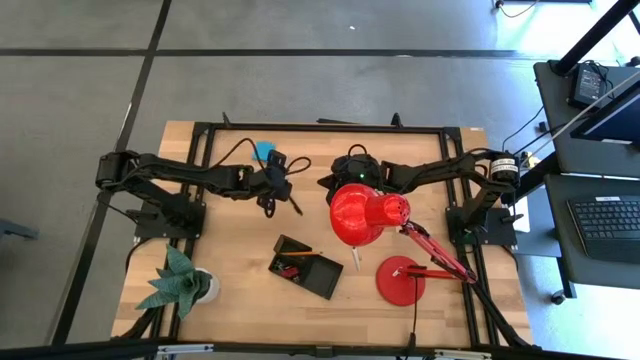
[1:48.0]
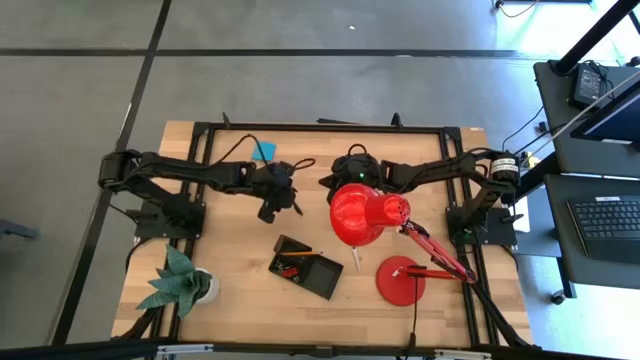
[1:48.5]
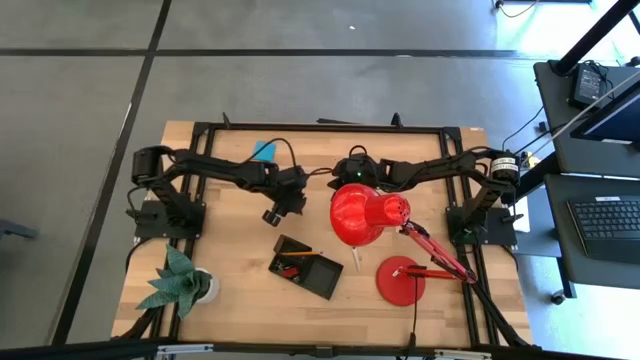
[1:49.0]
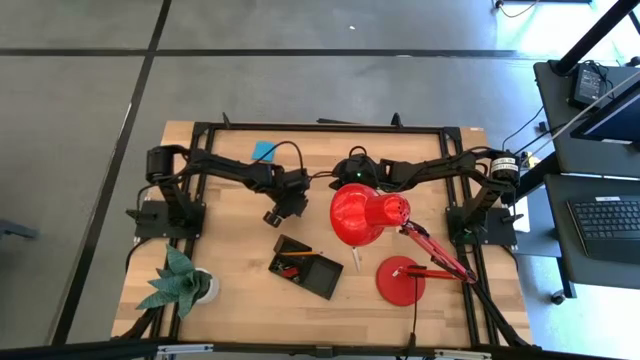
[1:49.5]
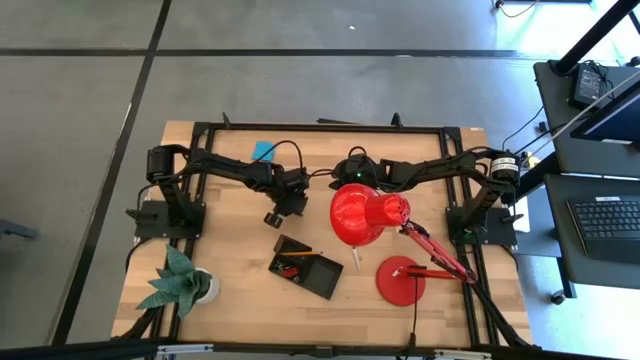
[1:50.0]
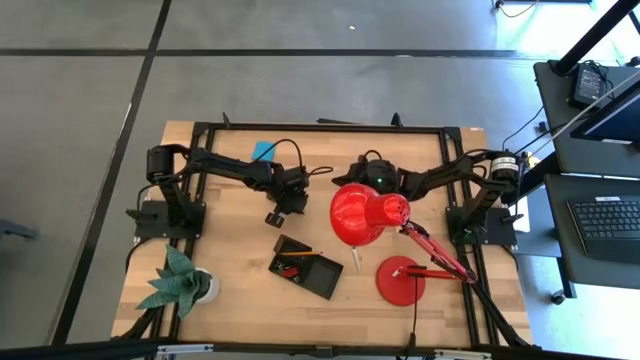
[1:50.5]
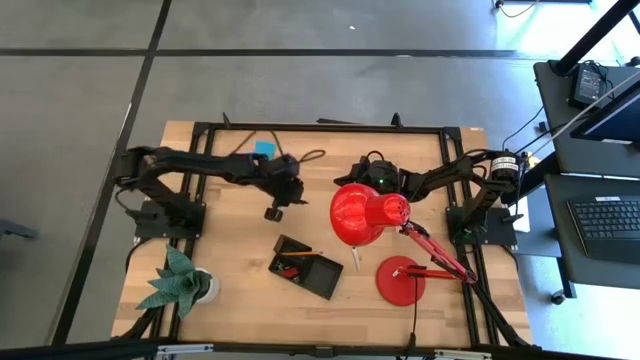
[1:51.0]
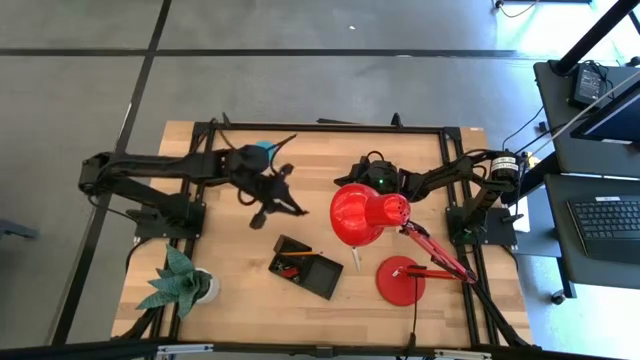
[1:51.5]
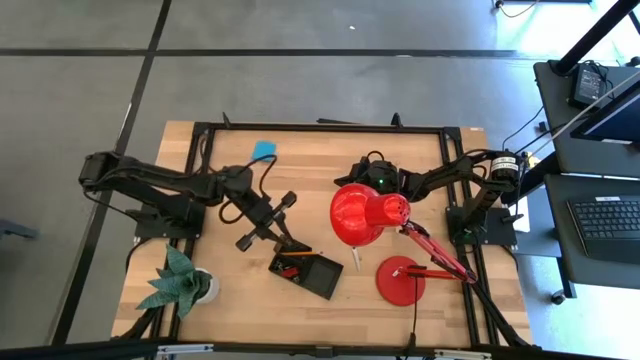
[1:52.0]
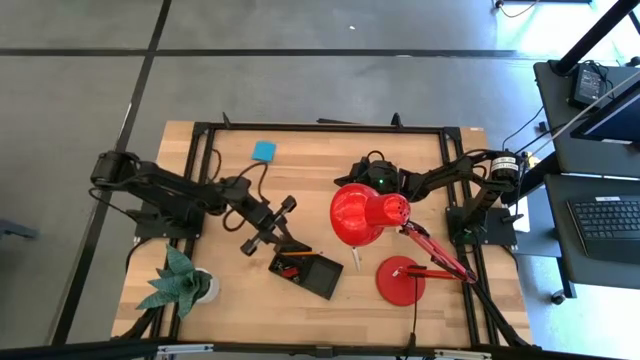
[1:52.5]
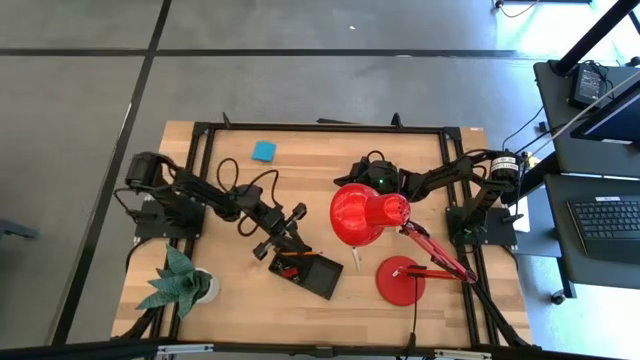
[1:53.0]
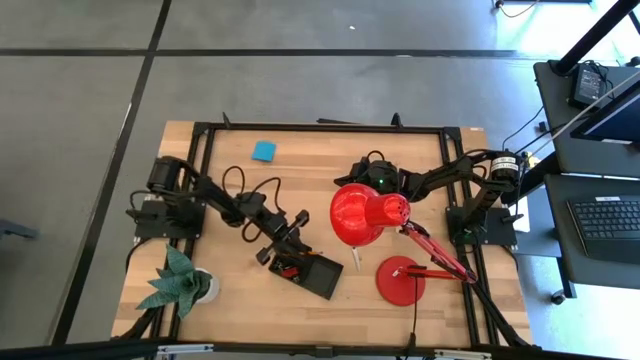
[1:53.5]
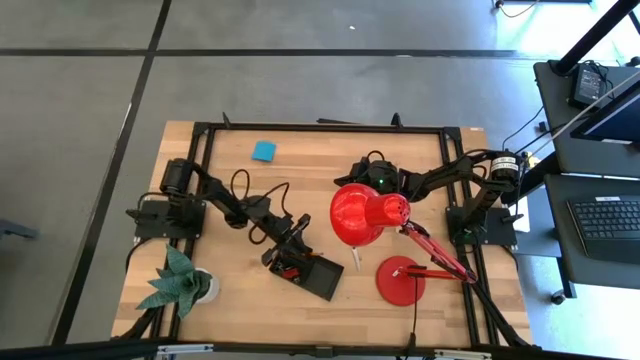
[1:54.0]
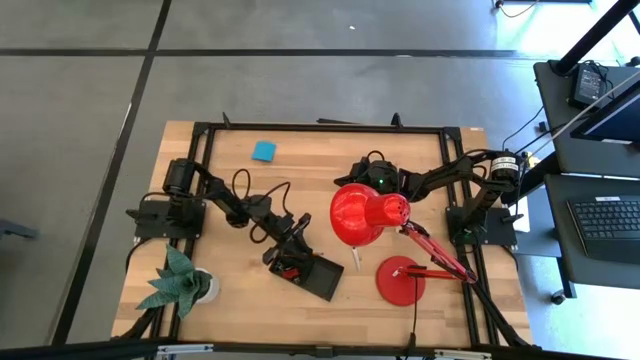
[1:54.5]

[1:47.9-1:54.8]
Task: Pick and place office supplies into organizer
Put the black pen into the desk organizer

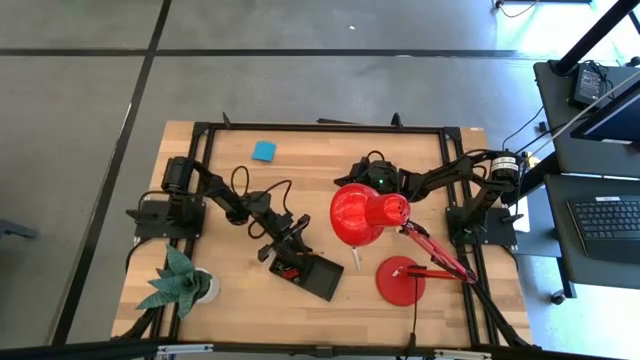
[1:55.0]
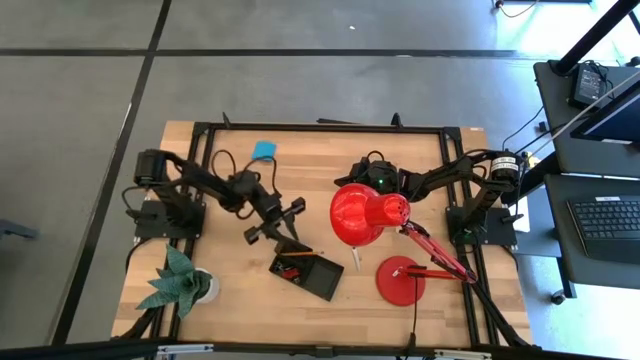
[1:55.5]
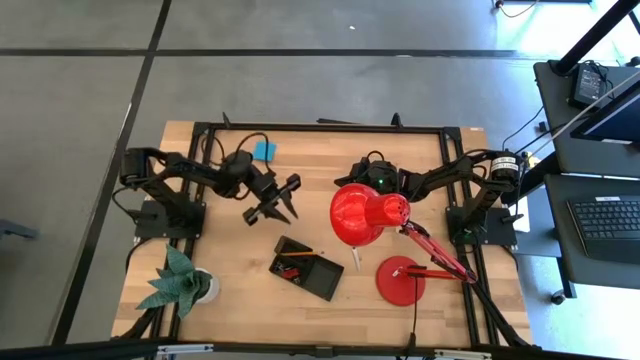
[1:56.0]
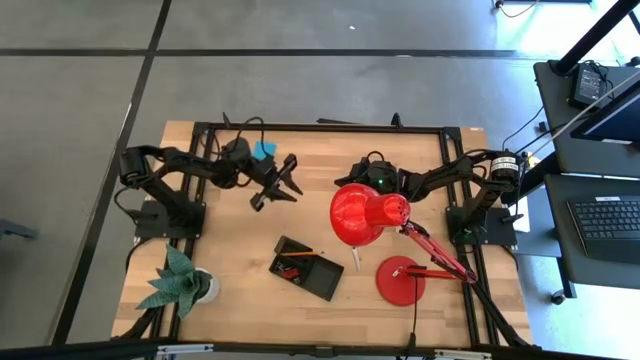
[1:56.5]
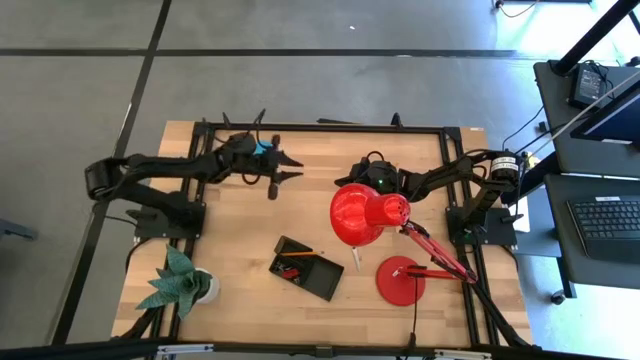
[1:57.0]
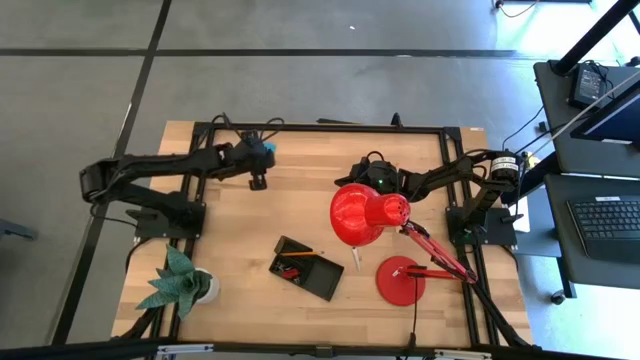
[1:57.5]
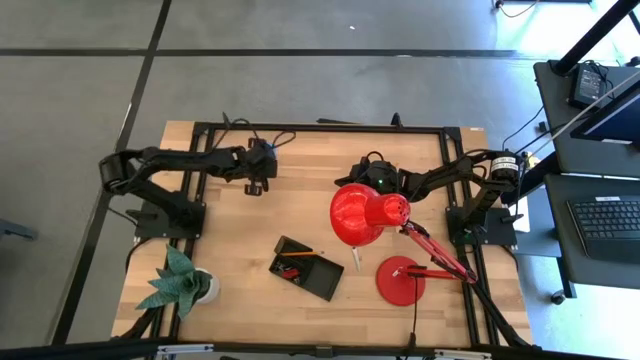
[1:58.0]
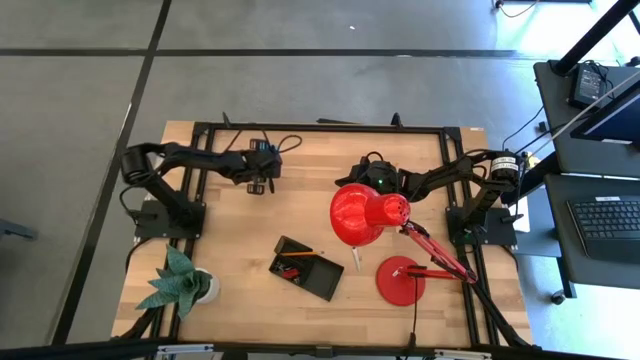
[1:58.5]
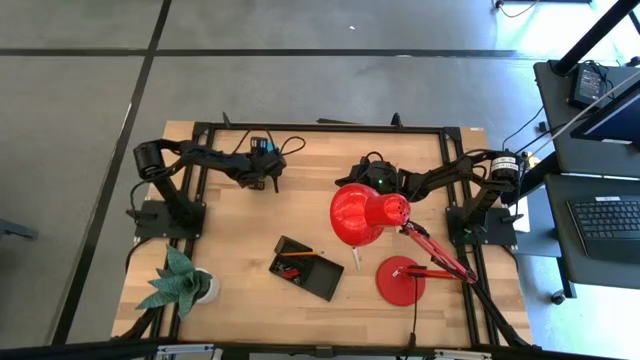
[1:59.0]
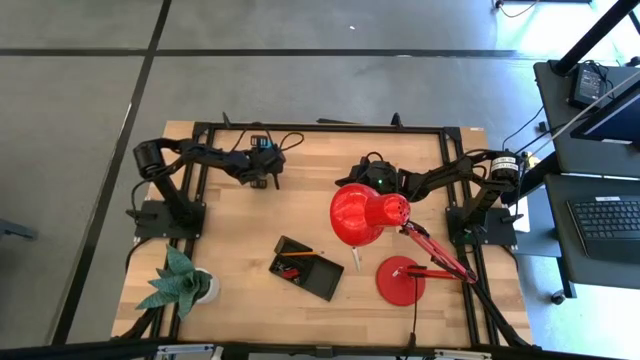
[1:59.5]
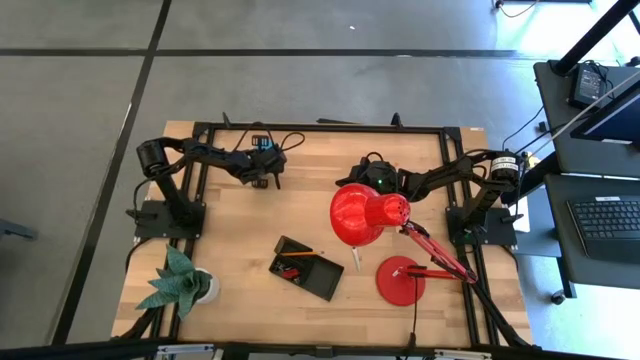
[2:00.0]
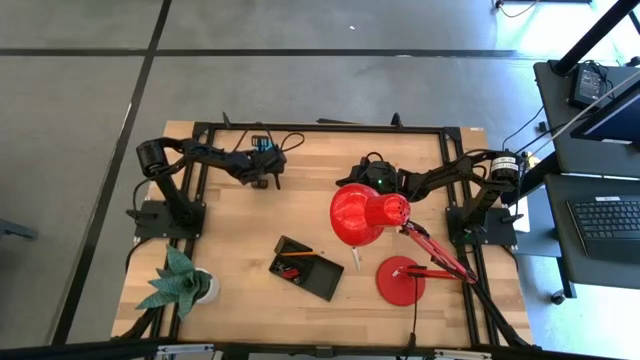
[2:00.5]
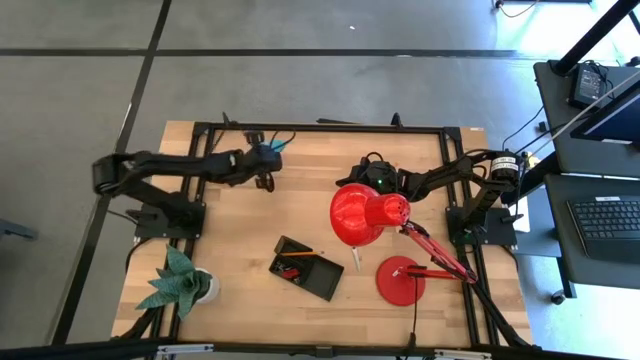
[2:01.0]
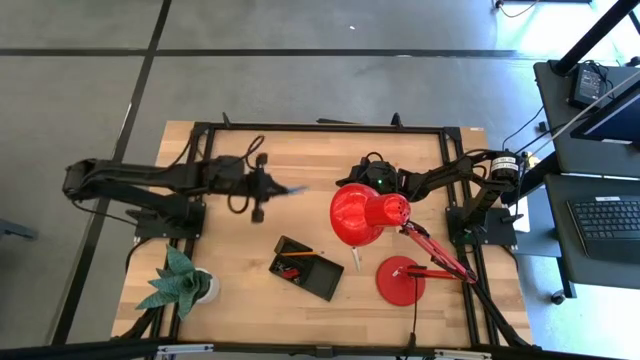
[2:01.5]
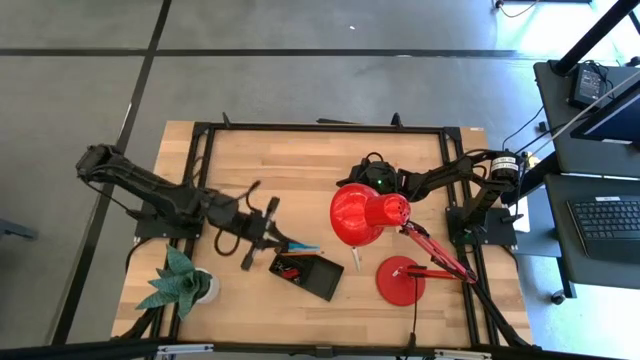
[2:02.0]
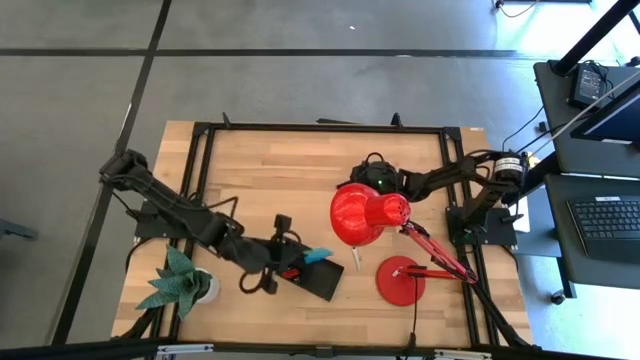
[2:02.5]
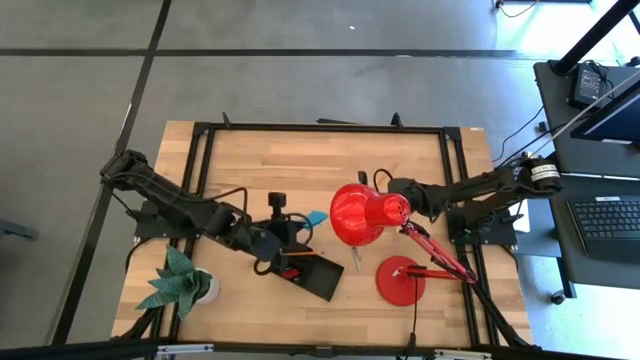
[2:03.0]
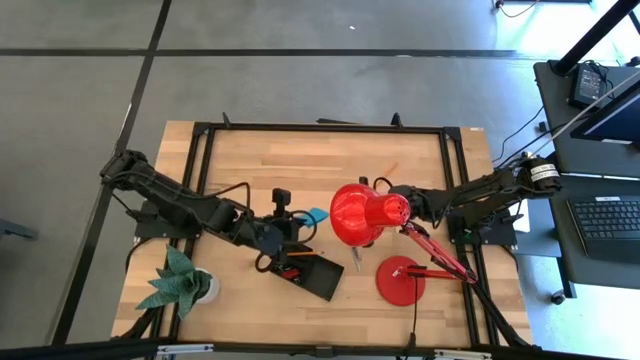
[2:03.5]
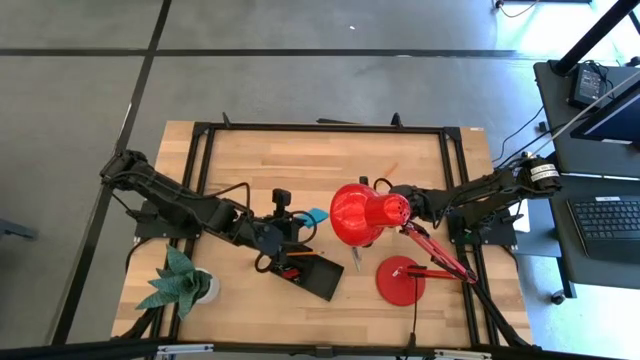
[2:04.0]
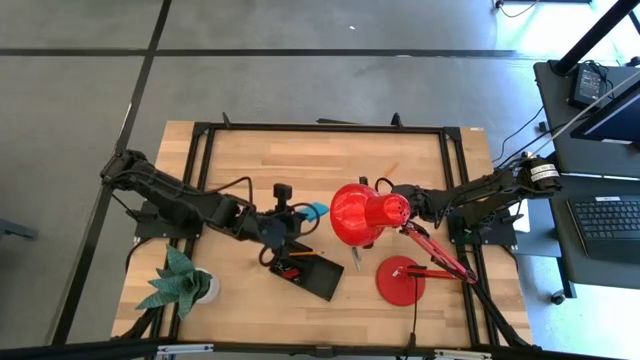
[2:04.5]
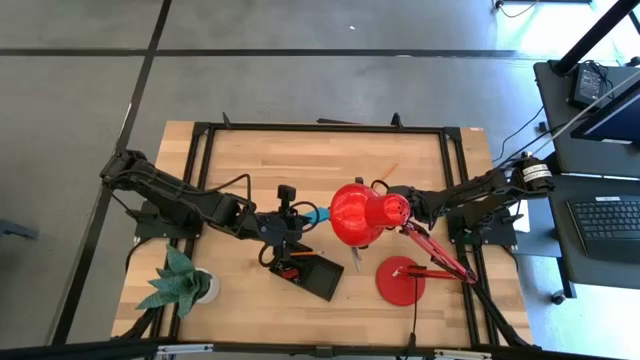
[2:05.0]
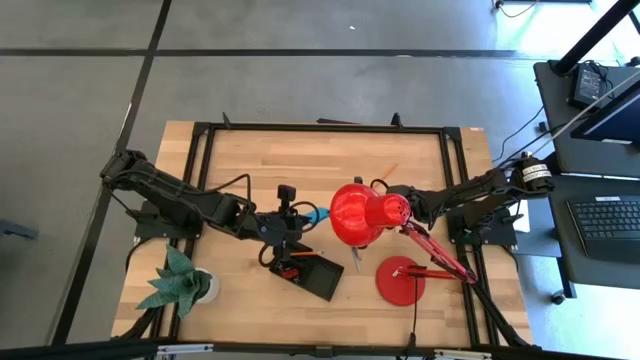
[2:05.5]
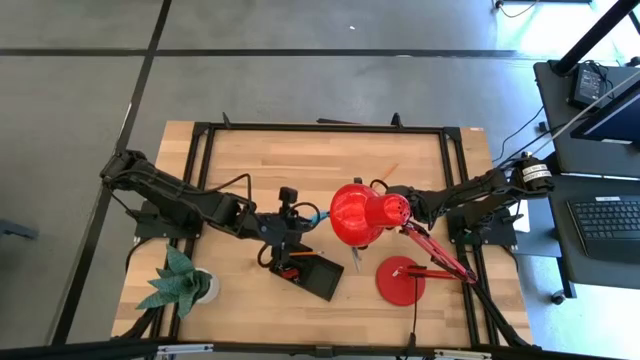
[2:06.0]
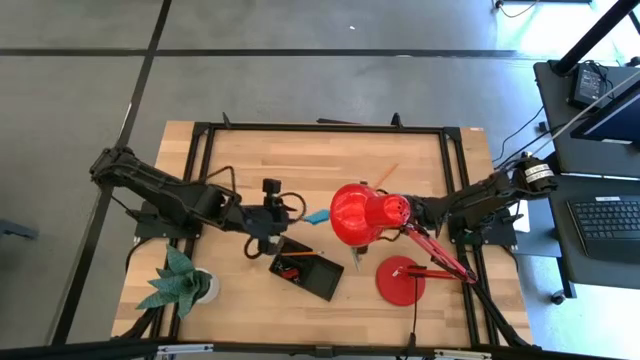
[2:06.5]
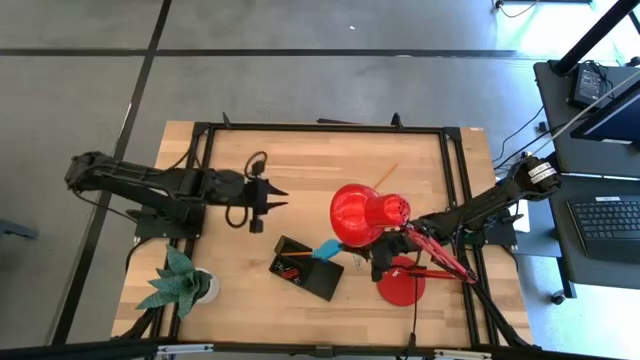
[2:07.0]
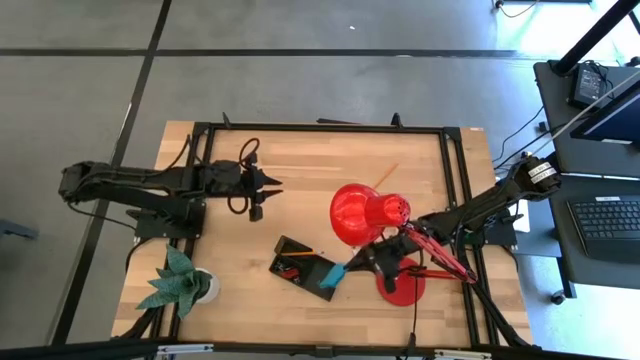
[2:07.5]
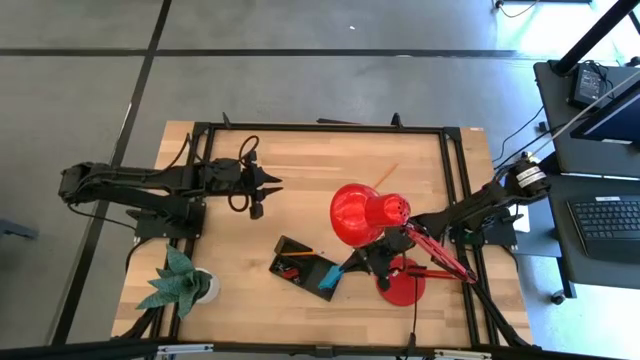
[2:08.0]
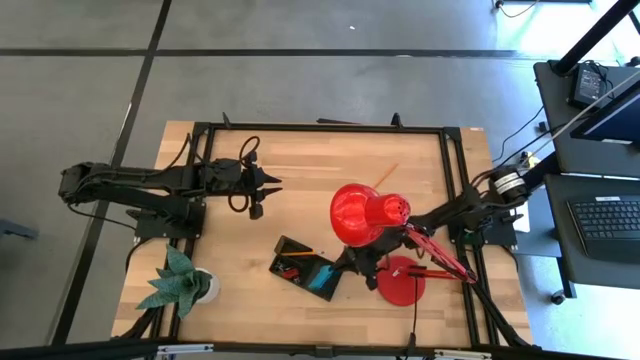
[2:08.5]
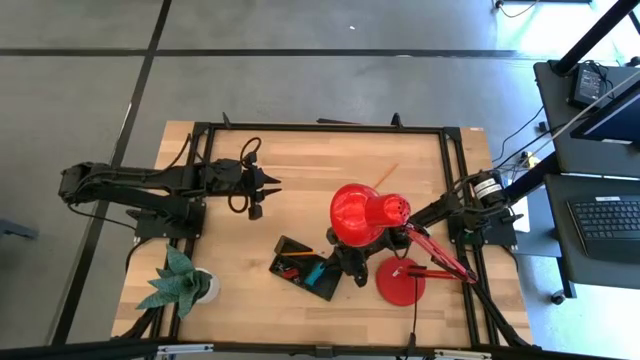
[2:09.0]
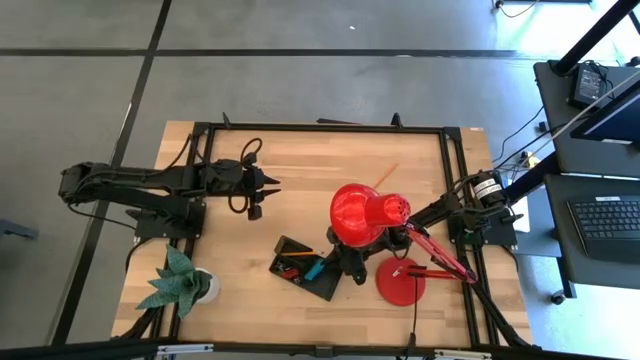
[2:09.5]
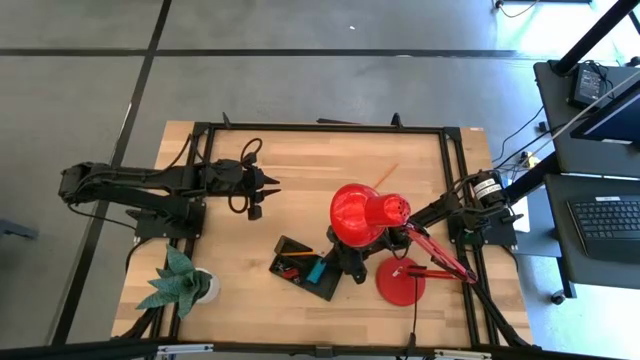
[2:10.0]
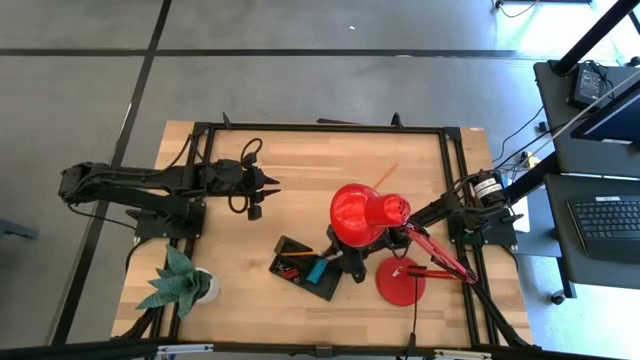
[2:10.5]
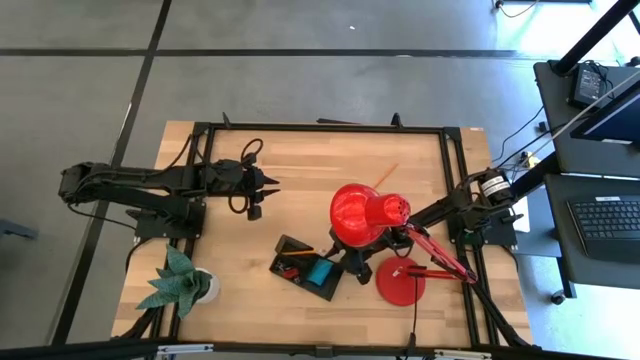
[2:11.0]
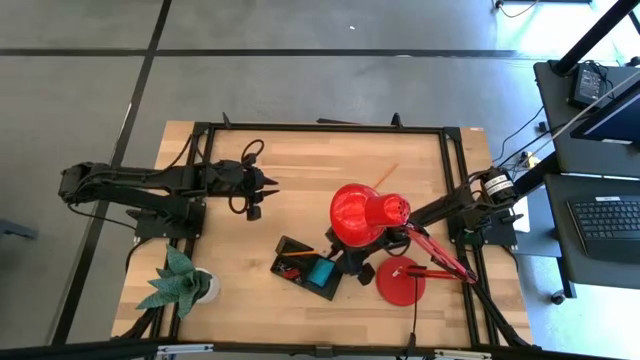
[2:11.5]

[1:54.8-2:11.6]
Put the blue sticky note into the desk organizer
